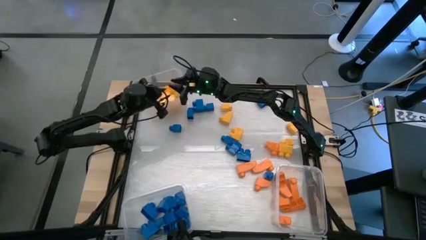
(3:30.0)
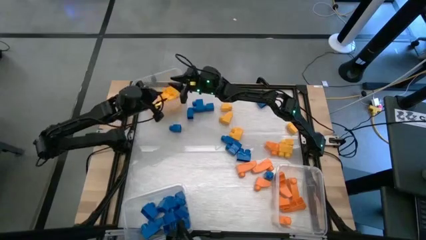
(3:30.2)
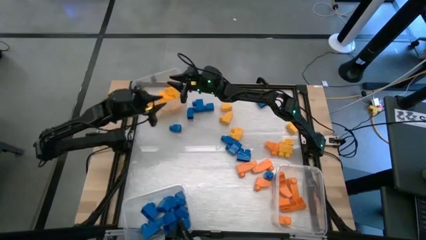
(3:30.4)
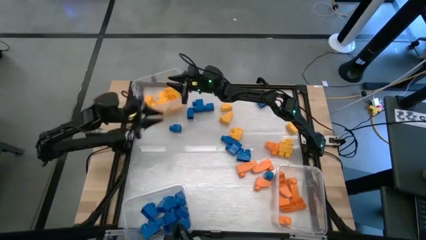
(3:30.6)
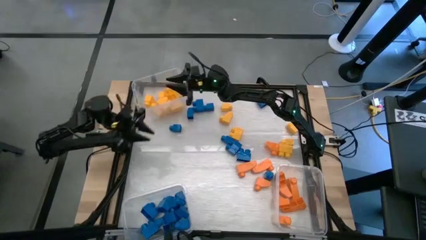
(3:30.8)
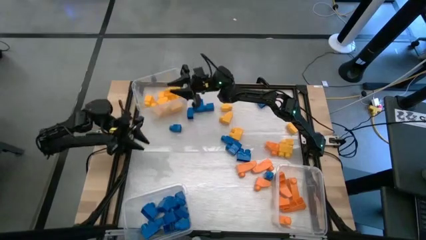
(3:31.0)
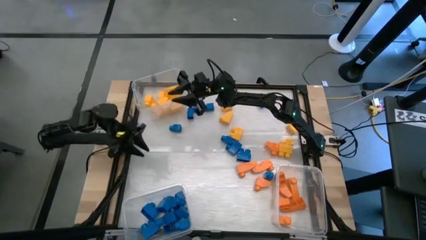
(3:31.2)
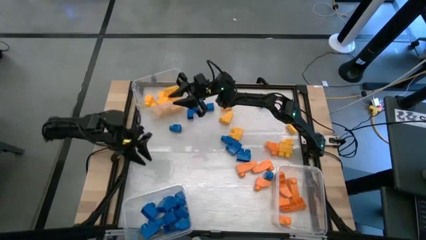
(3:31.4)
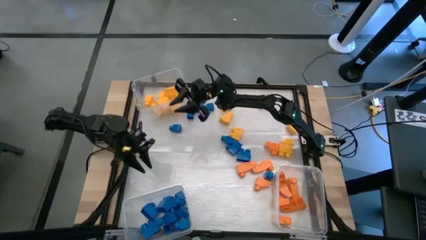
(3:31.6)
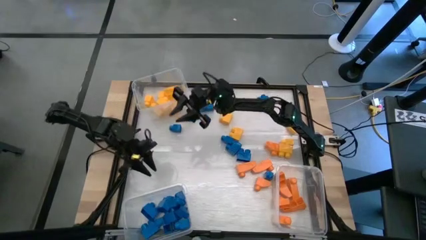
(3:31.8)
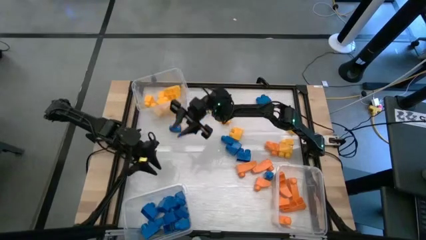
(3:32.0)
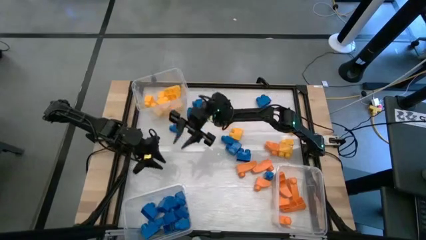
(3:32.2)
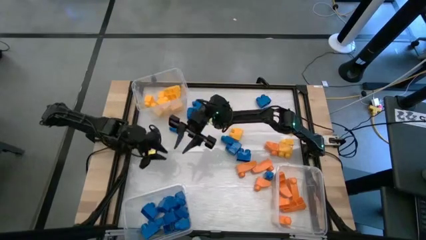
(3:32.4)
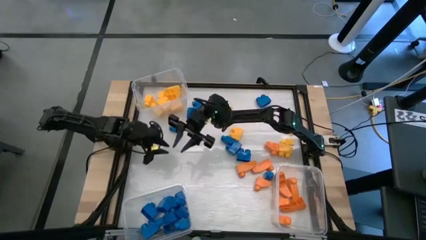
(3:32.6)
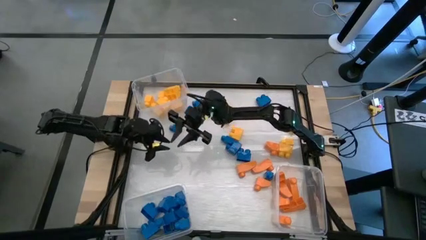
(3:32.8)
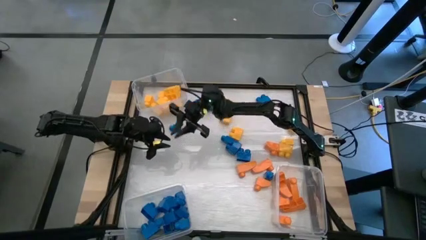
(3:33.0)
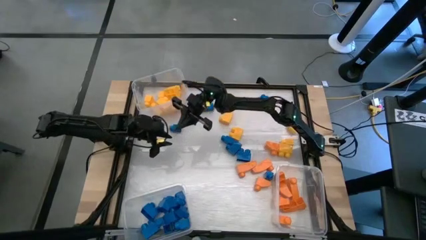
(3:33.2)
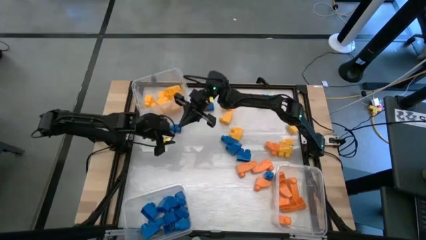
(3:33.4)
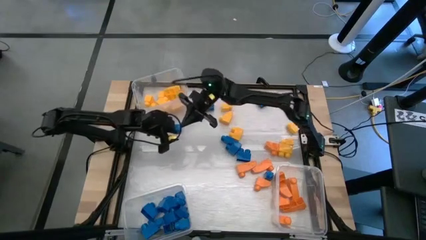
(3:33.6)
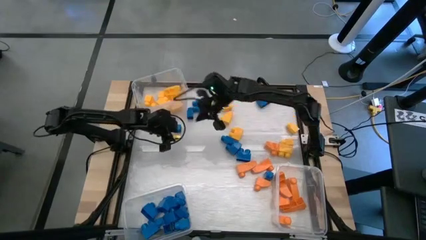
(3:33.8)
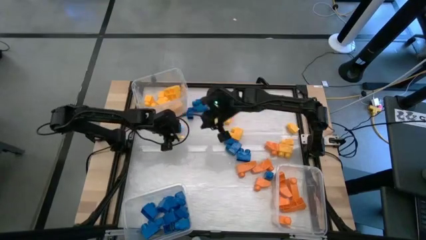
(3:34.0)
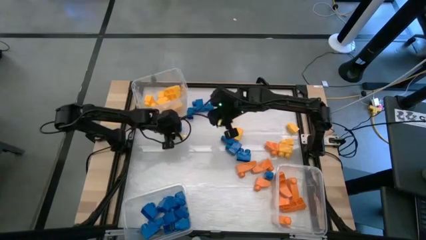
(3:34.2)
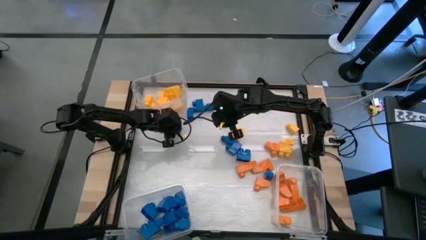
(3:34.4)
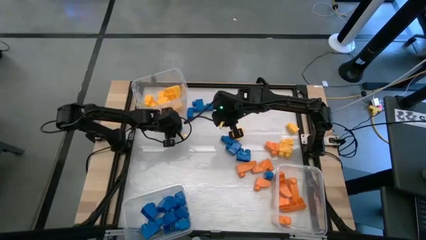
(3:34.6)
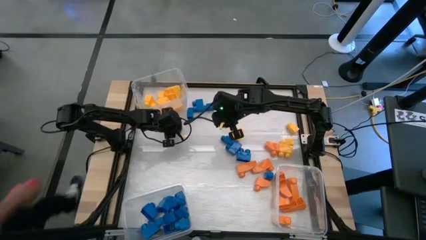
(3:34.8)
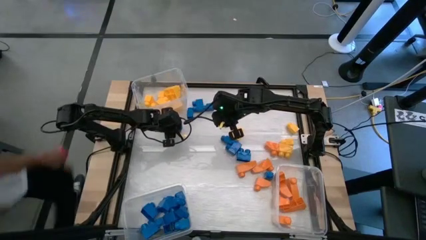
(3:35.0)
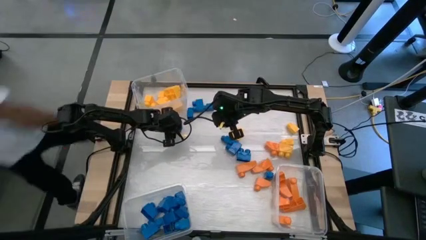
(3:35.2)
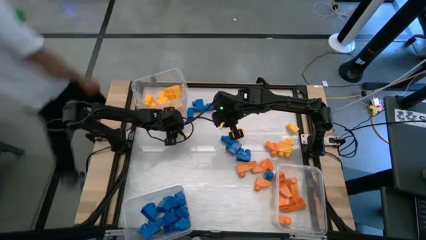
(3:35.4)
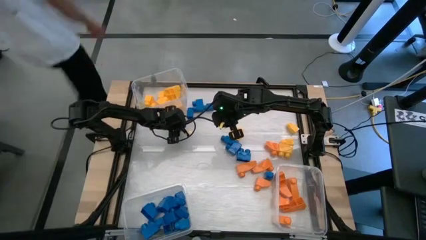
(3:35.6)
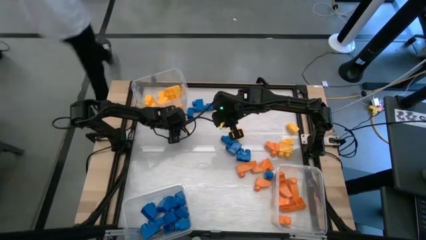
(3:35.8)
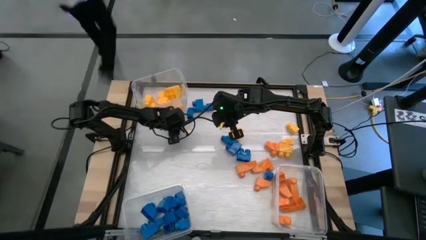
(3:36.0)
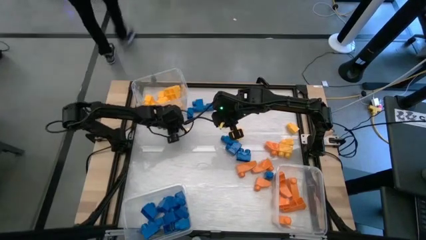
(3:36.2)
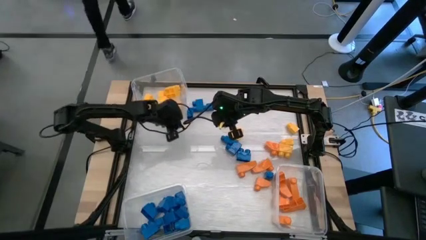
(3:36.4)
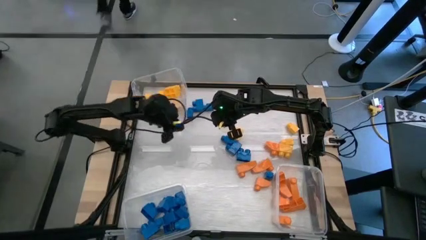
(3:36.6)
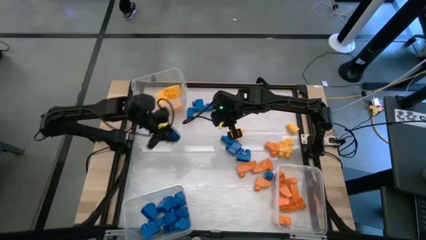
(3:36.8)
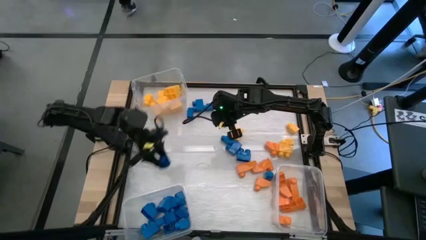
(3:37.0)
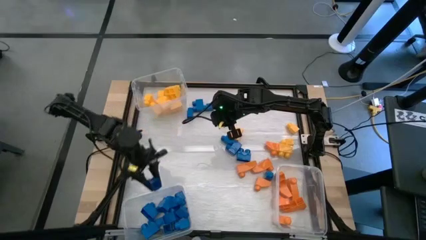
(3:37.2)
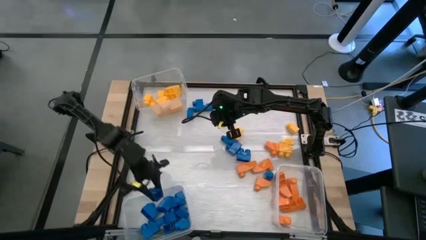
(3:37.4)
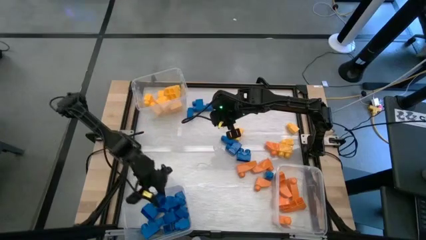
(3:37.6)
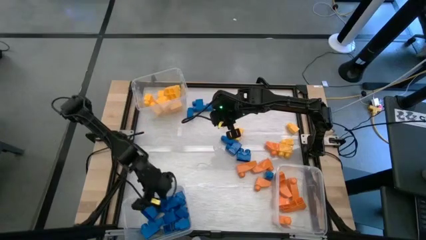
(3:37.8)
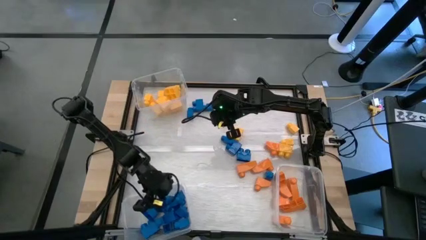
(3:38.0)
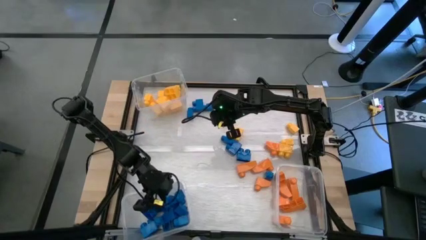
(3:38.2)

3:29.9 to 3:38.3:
Task: Sort blocks
Put the blue game piece into the bottom left transparent bin

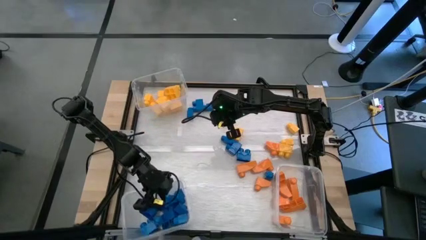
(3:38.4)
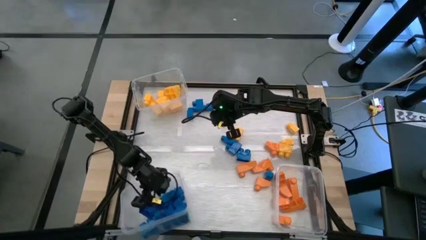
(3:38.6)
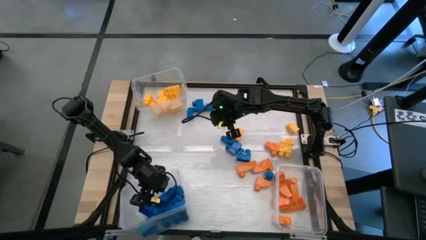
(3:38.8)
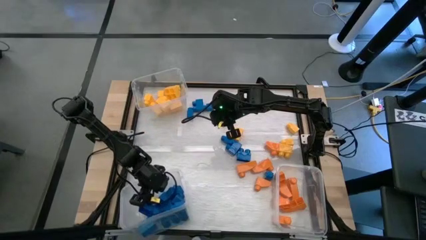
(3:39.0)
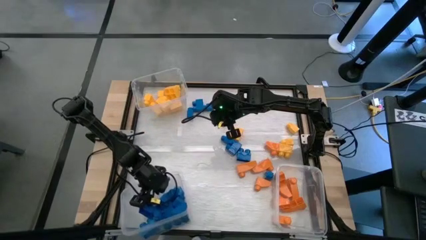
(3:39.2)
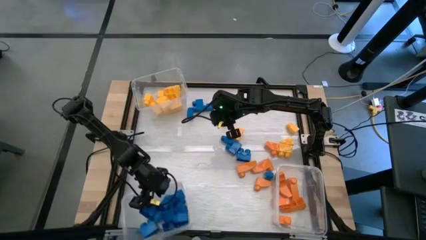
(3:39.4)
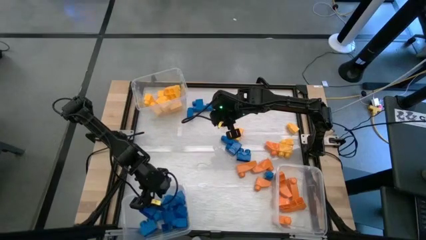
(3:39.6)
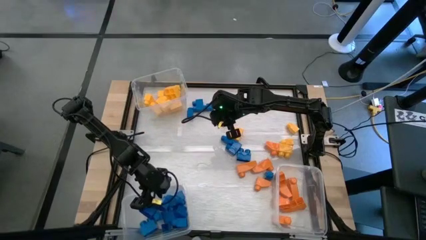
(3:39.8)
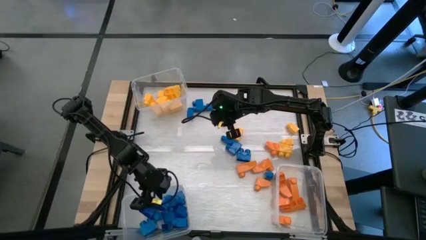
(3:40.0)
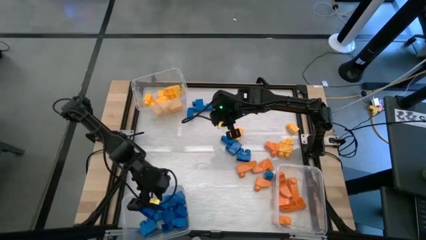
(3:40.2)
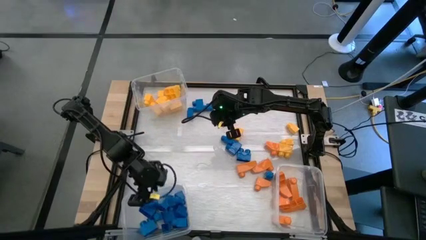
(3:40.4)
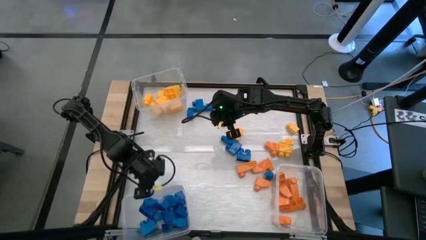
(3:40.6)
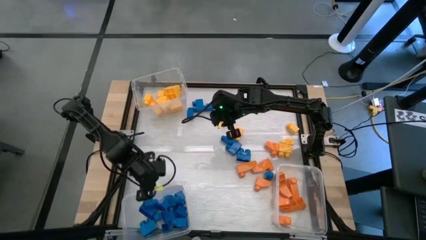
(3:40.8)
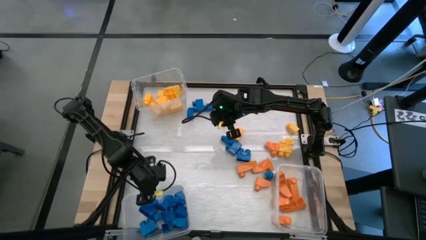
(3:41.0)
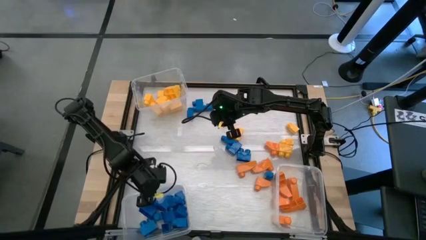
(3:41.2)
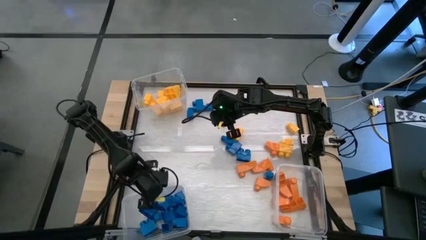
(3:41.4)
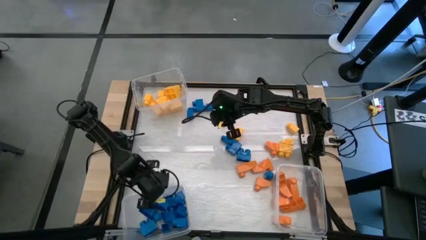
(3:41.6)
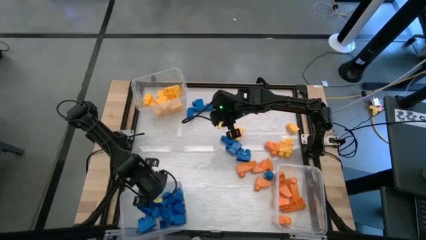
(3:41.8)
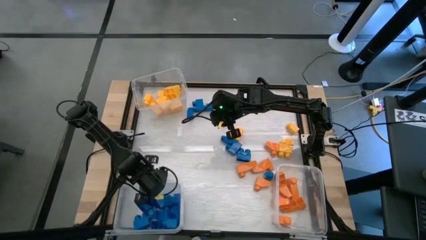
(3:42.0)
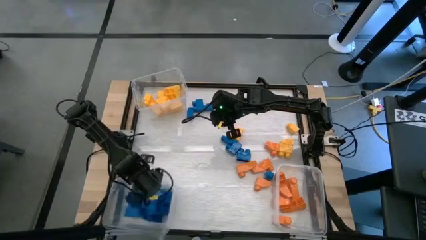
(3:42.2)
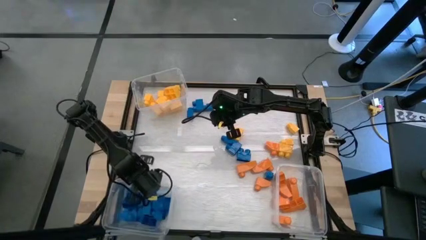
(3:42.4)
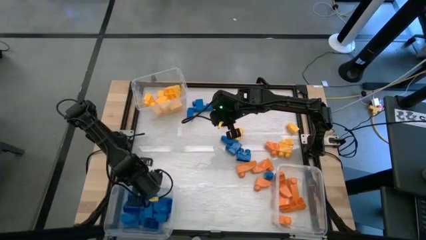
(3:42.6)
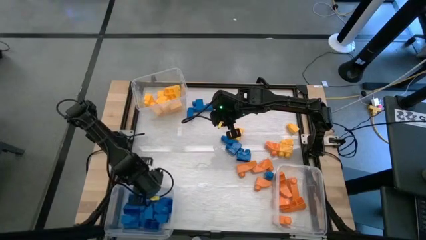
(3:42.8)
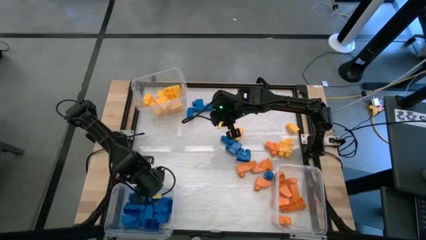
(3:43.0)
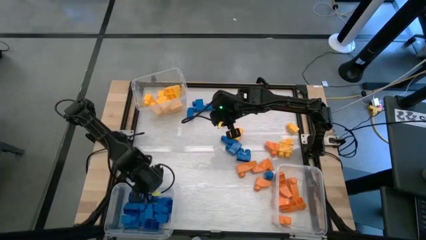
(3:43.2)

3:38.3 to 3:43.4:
Adjust the bottom left transparent bin

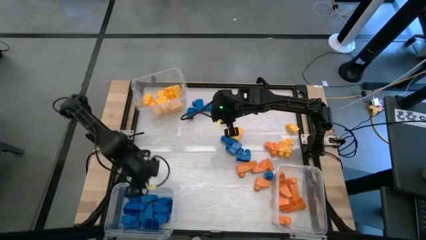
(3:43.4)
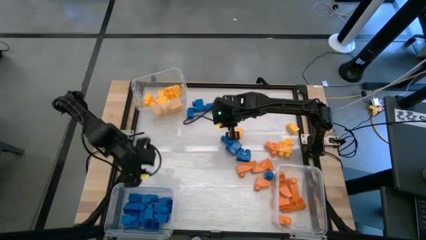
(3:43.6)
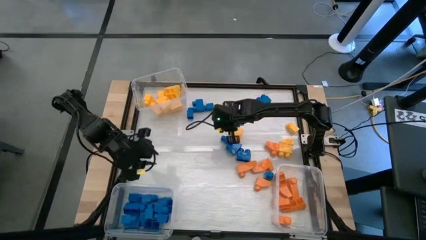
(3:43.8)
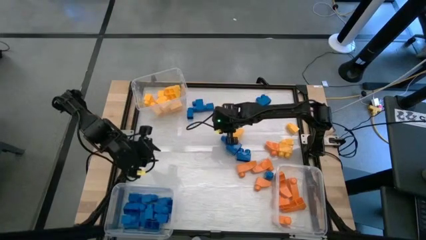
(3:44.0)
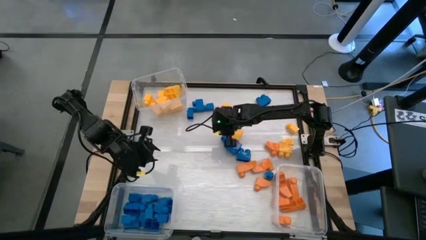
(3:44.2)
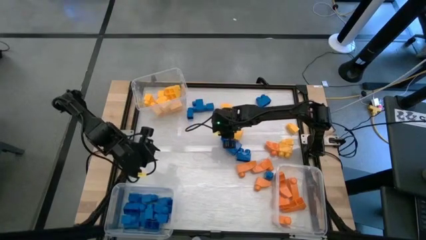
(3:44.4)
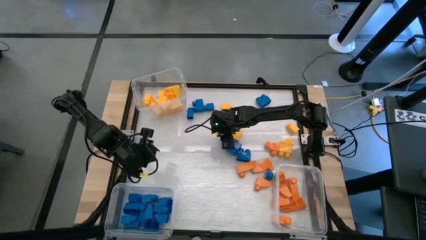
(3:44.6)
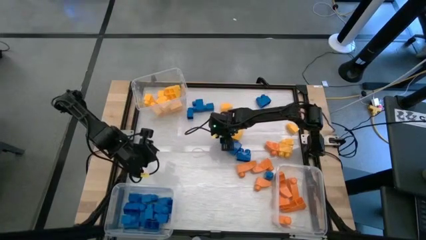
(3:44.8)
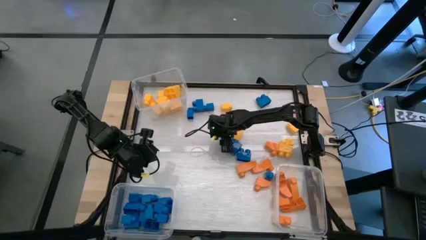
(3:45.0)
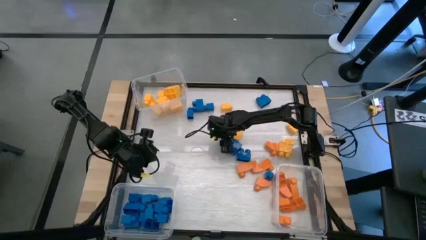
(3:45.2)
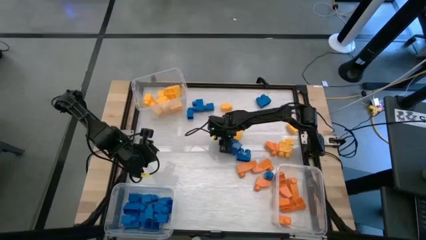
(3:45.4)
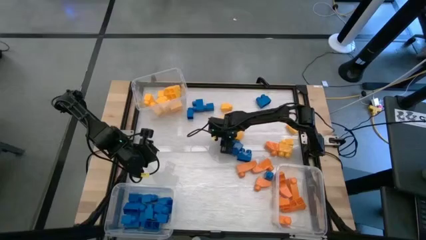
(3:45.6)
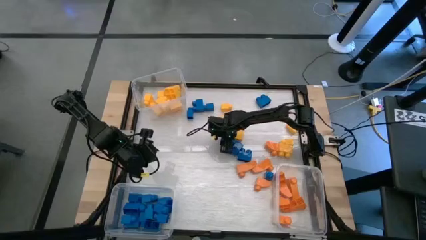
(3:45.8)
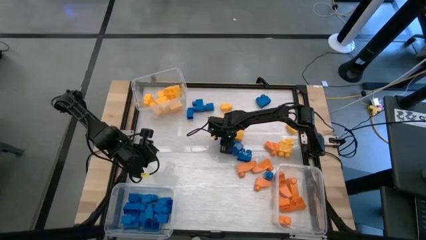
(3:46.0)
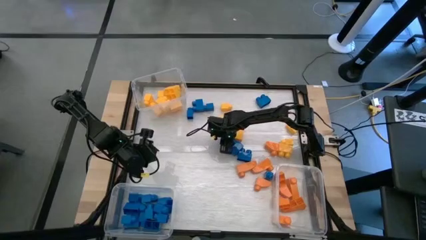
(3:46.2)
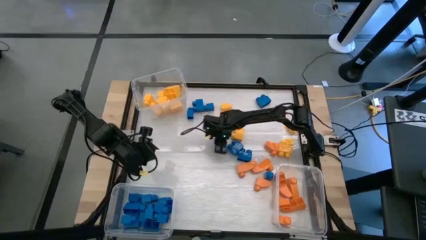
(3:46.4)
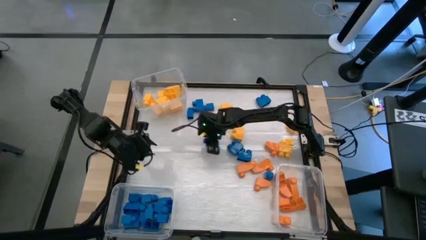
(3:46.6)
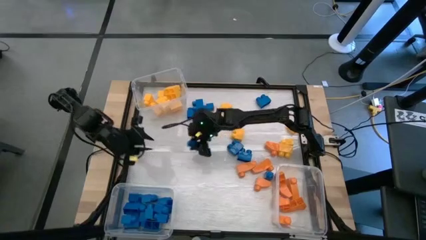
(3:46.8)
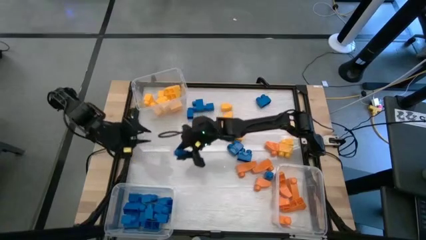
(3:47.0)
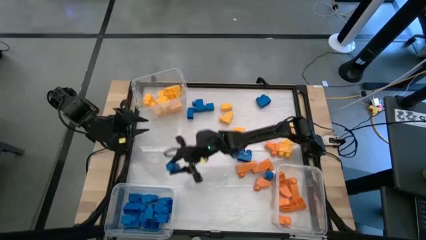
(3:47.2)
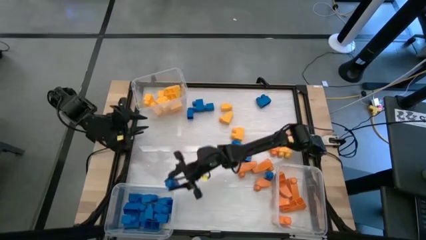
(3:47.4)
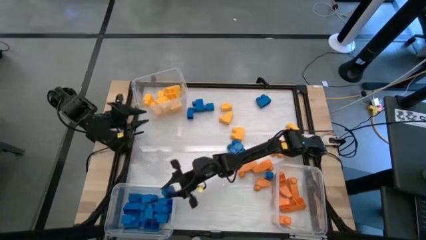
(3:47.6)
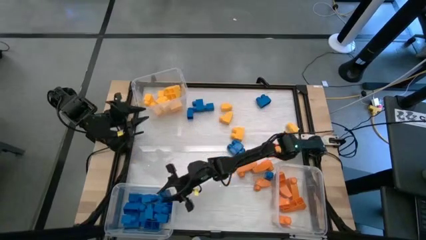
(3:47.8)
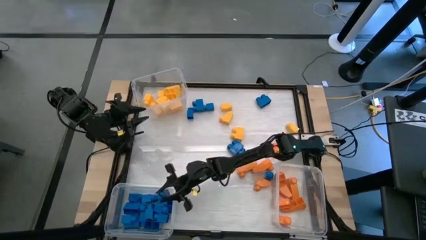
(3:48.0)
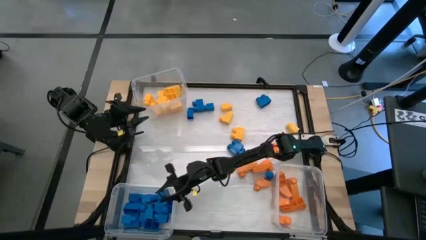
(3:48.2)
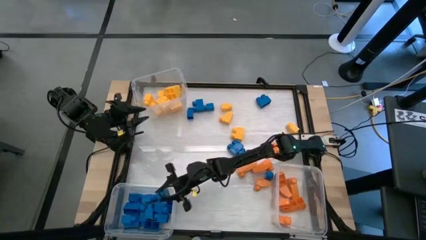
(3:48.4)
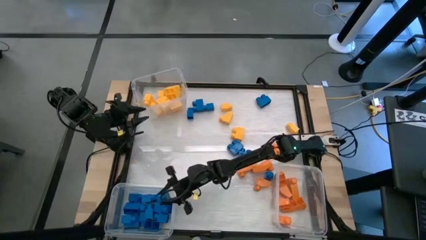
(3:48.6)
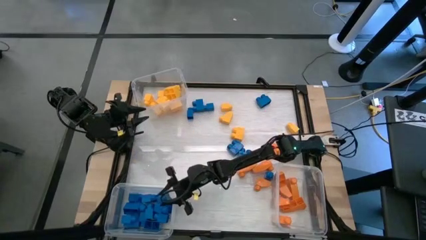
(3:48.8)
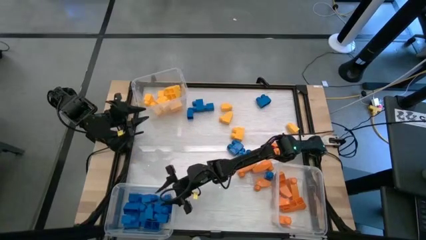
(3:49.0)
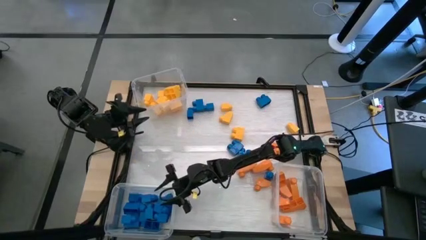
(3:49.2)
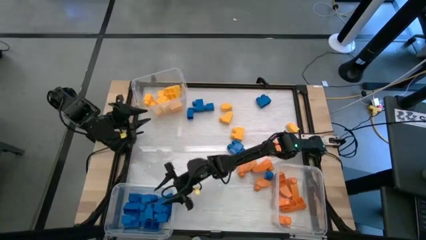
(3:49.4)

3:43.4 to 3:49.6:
Put the blue game piece into the bottom left transparent bin
